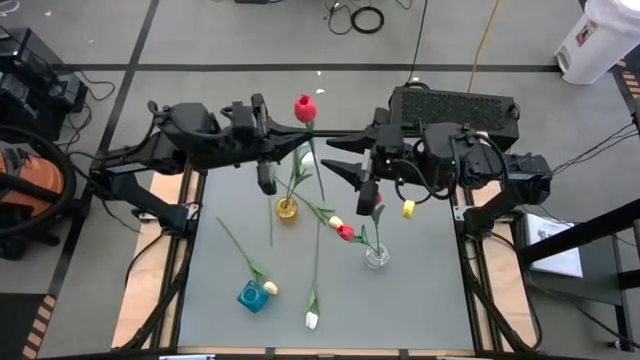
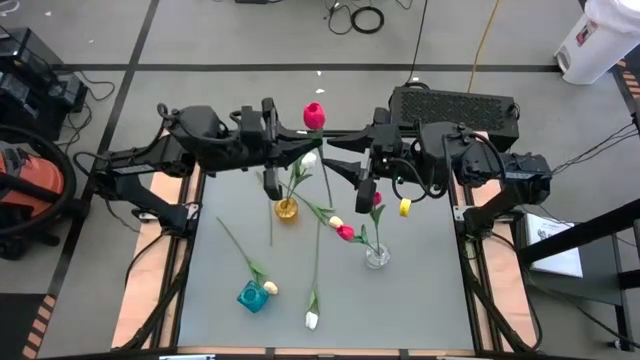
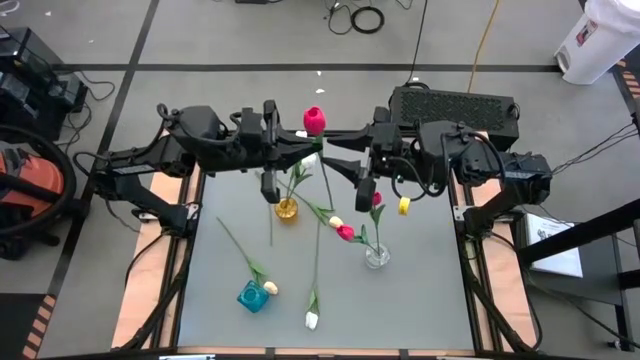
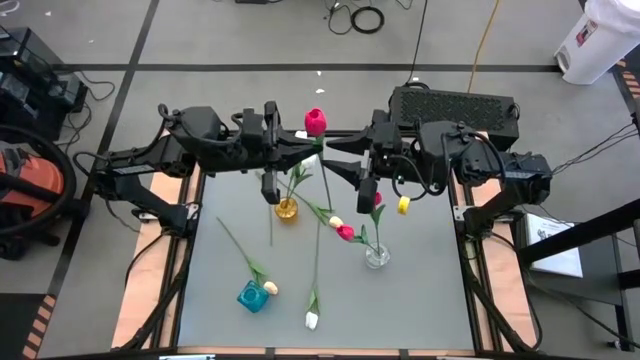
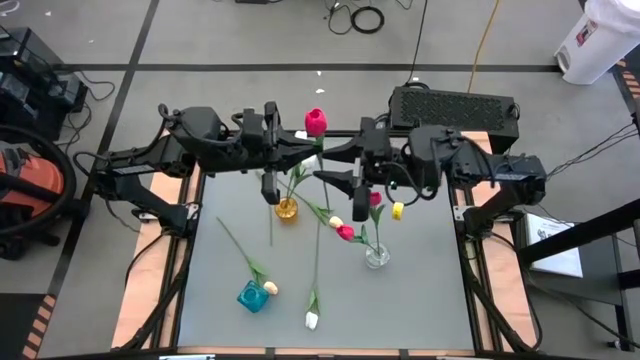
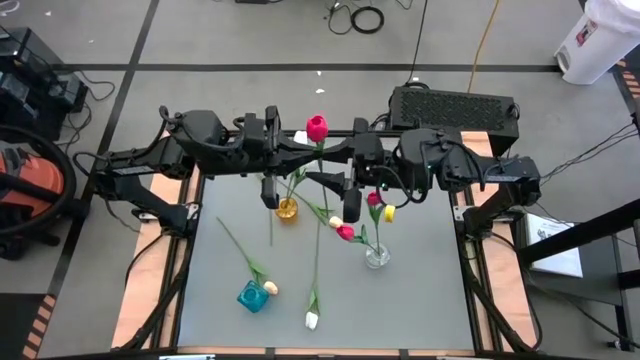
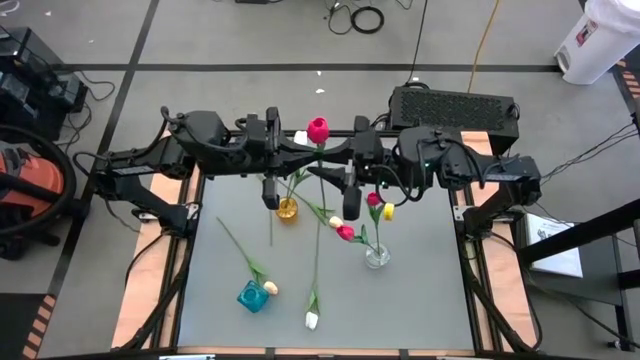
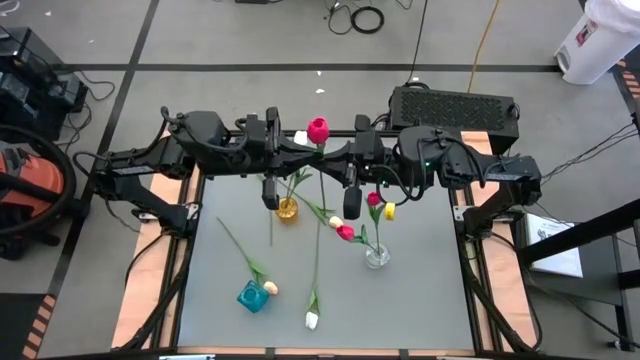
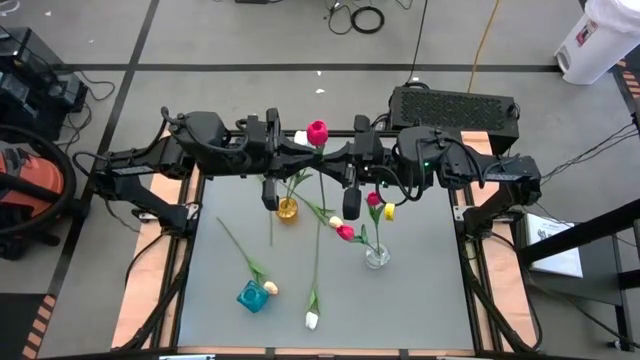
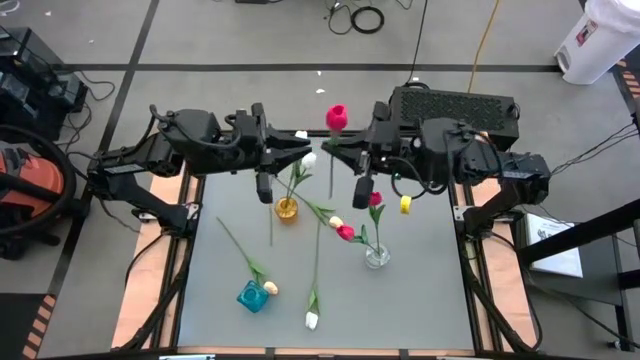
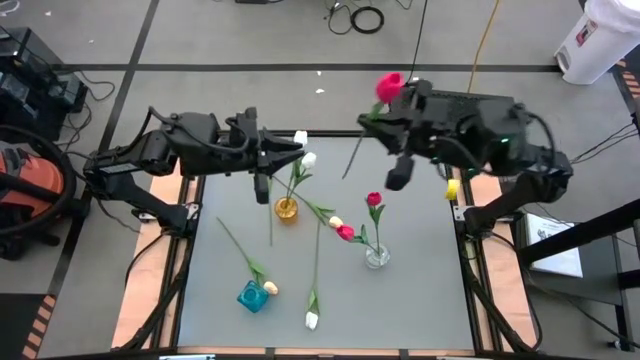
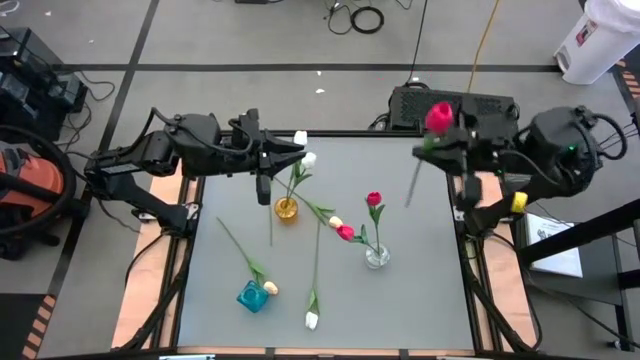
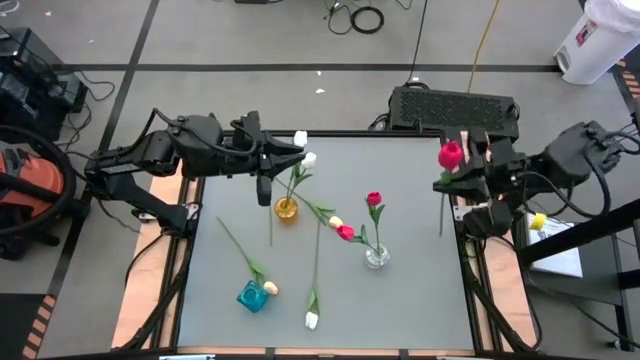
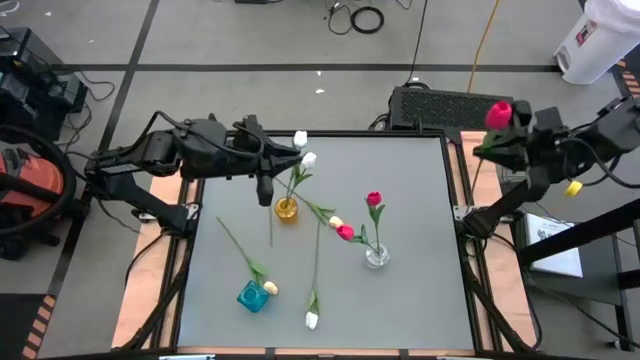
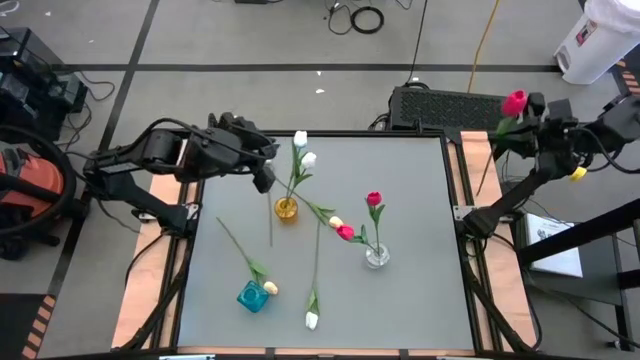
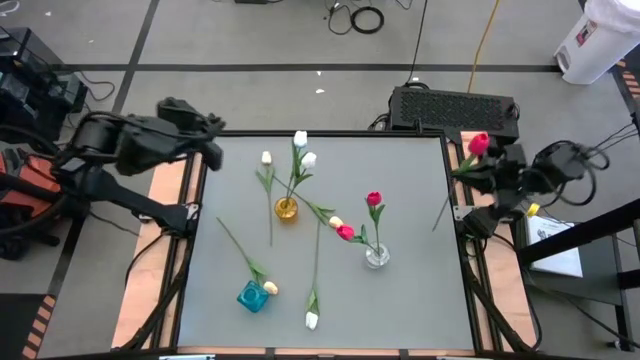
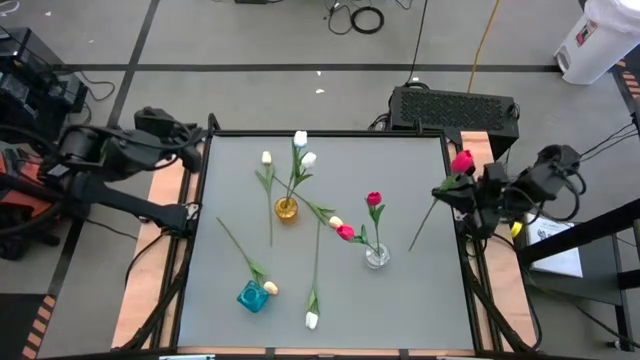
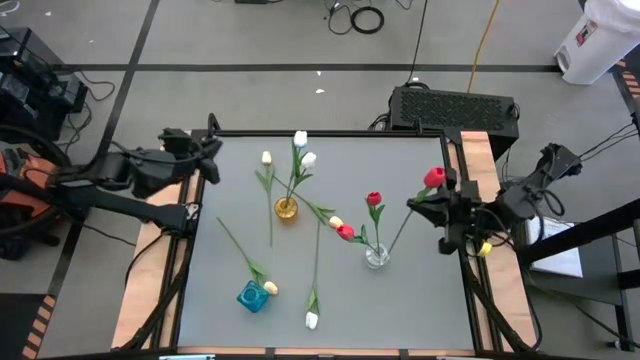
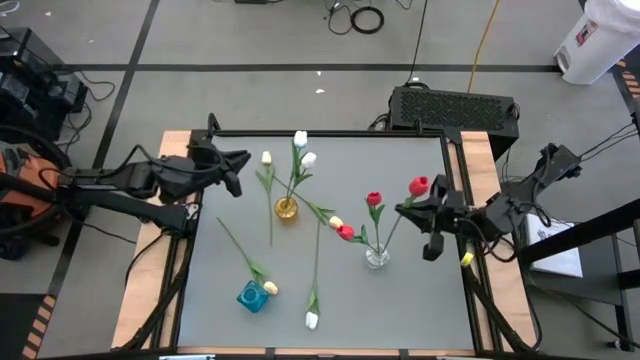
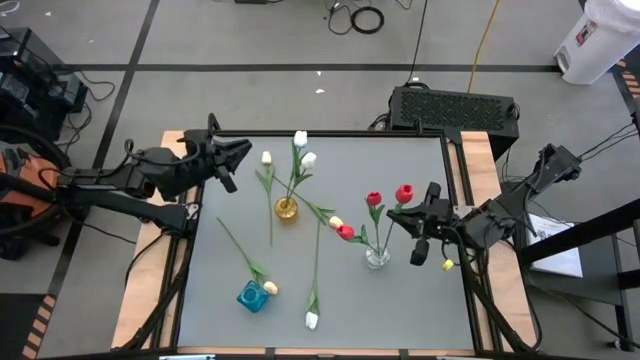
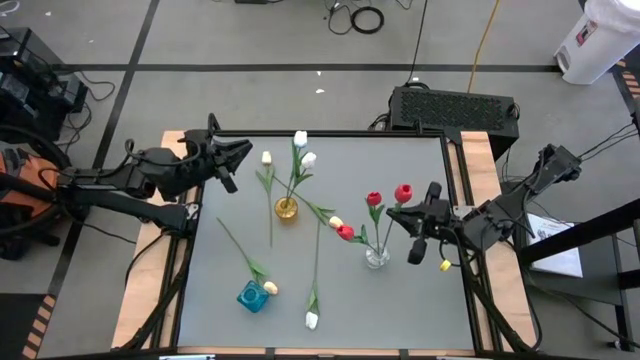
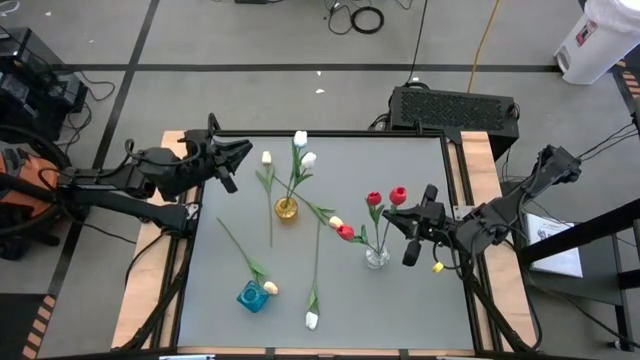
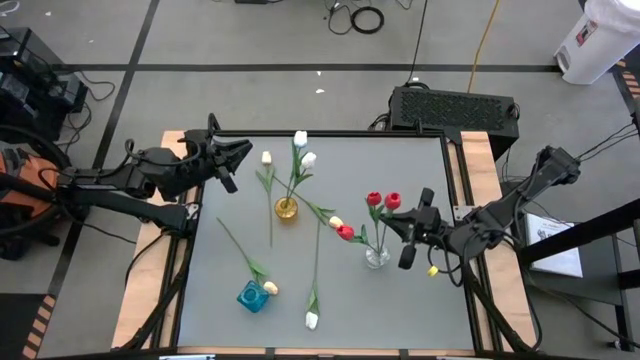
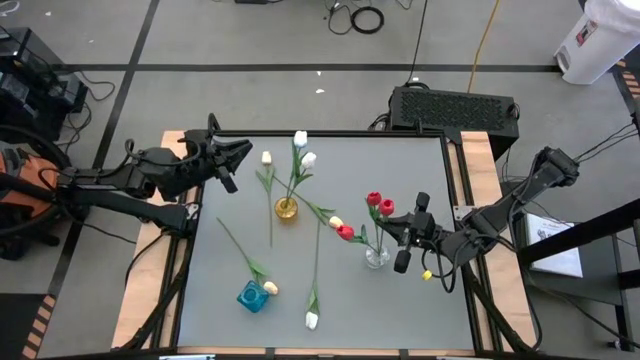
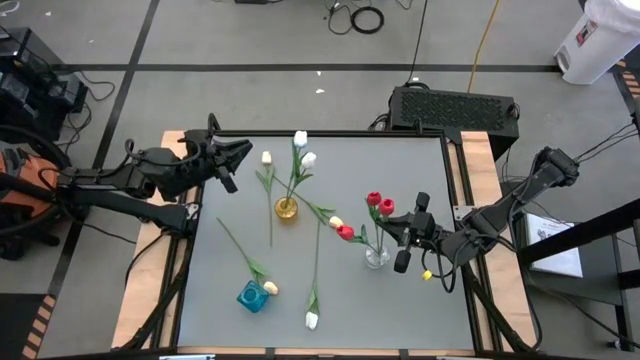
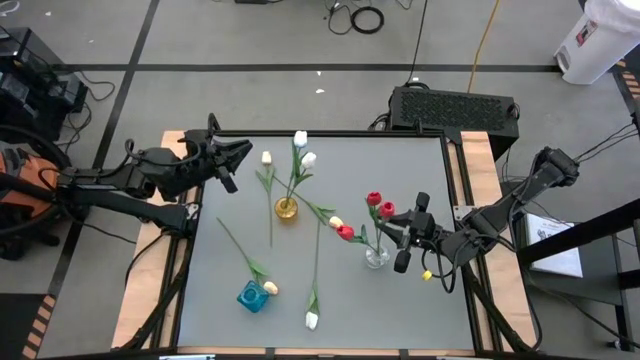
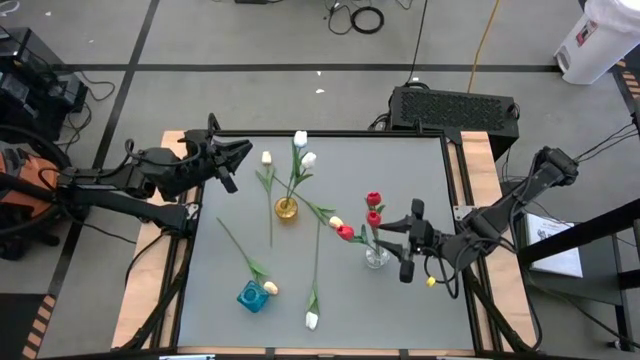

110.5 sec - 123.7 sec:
Task: Sort flowers into vase by color
Put the red tulip into the transparent vase

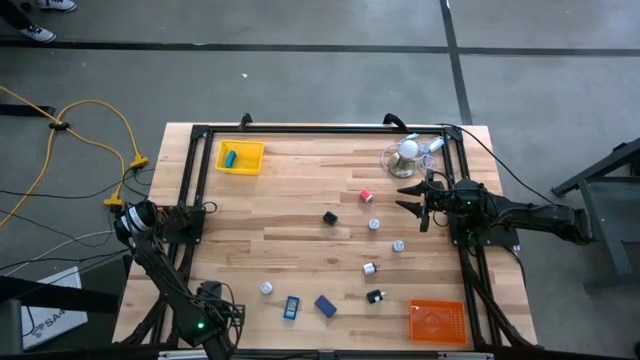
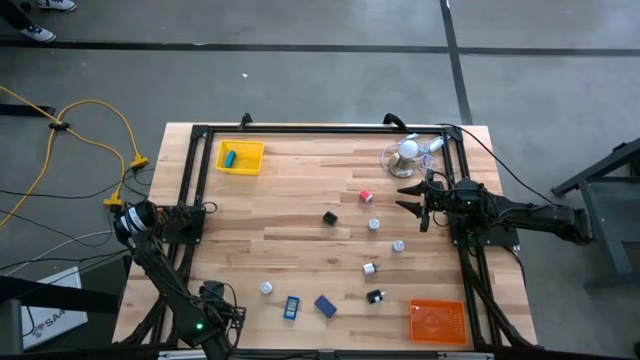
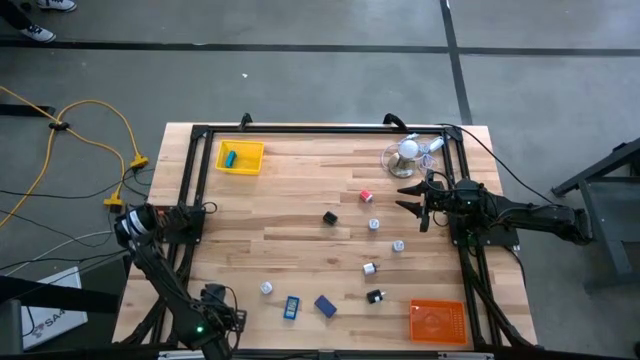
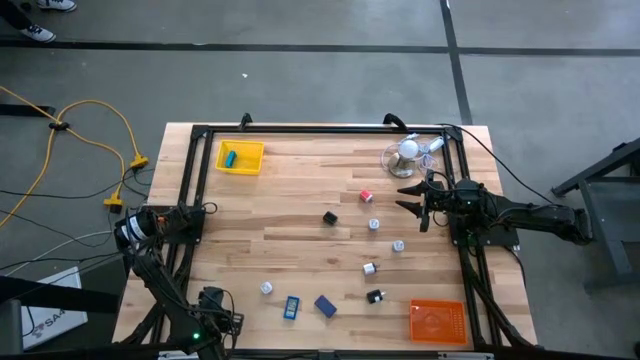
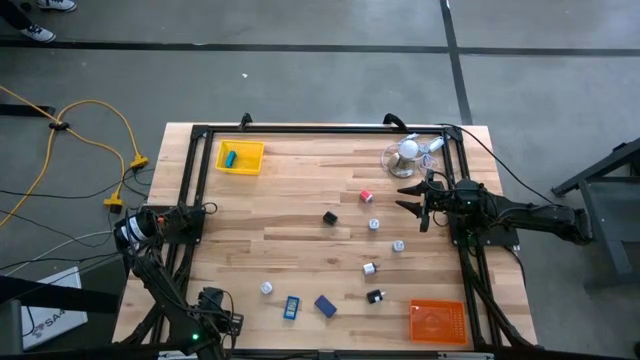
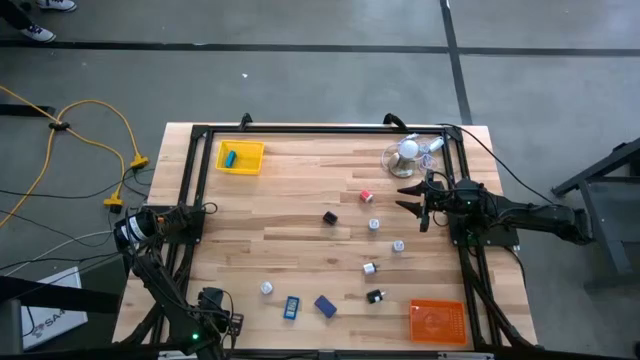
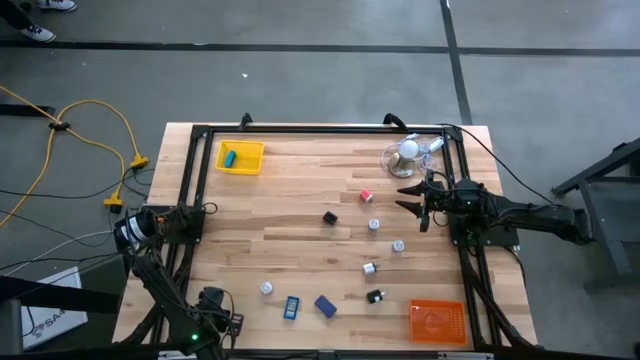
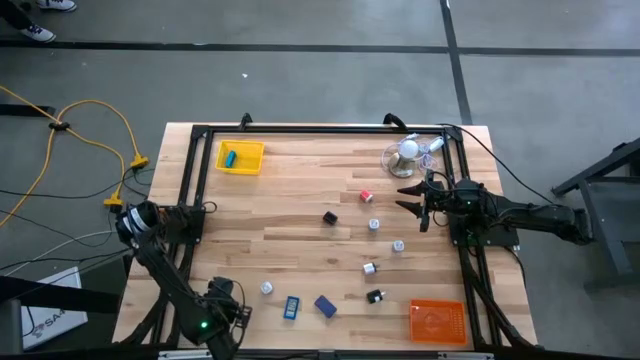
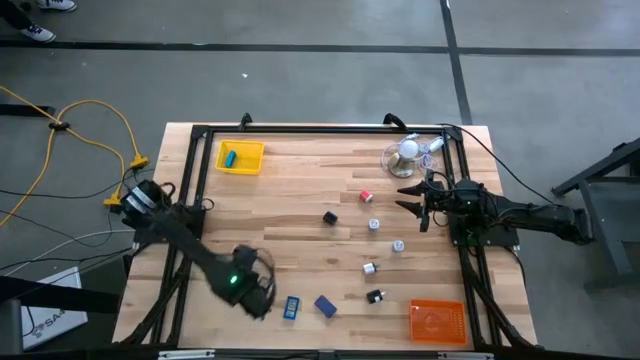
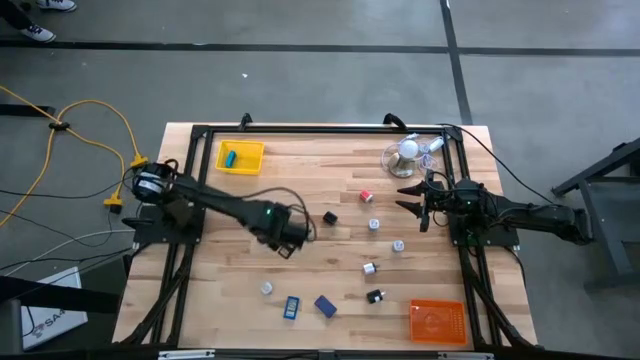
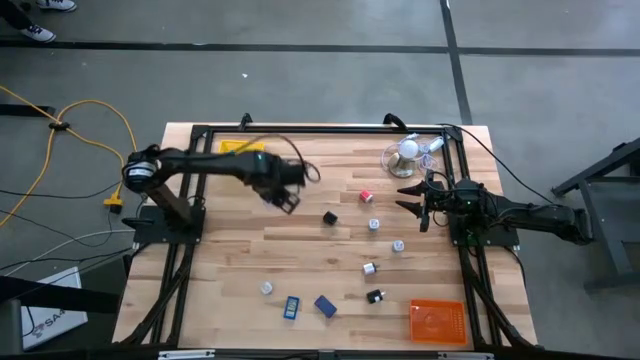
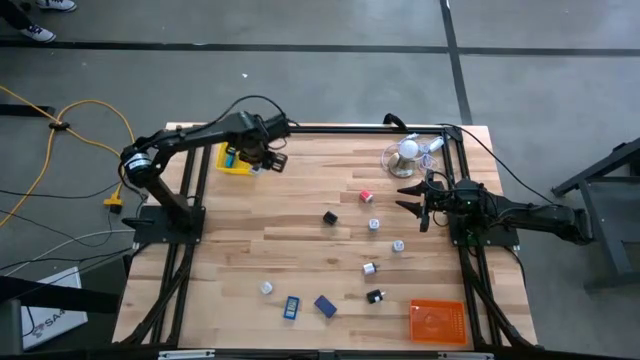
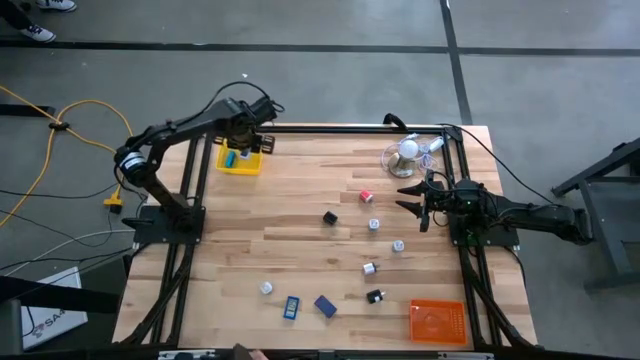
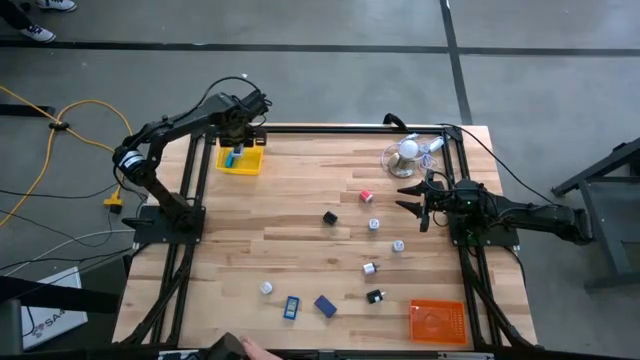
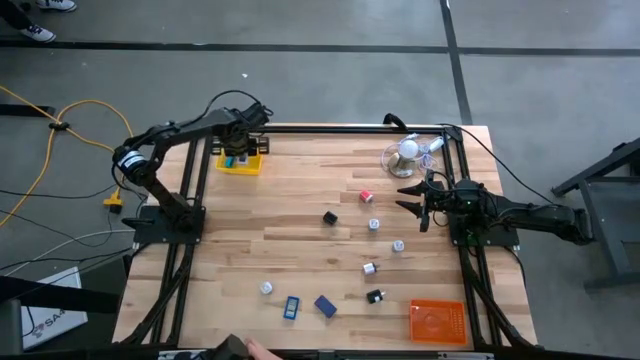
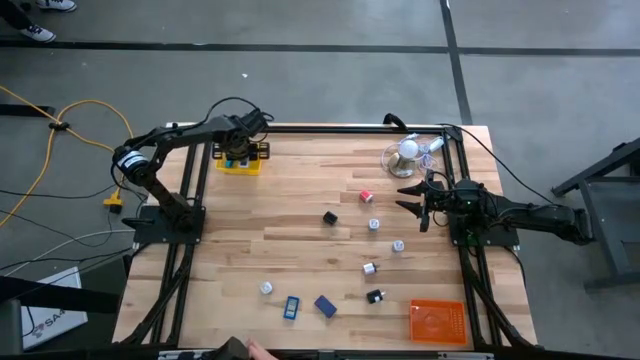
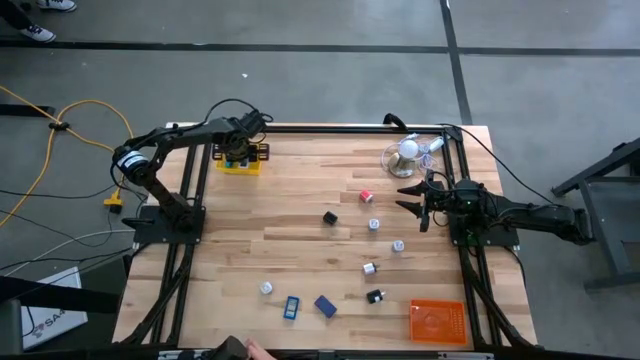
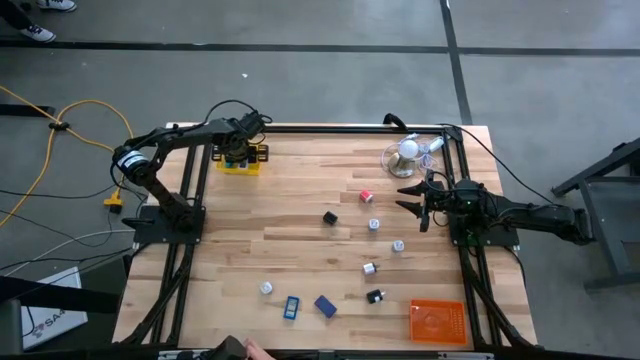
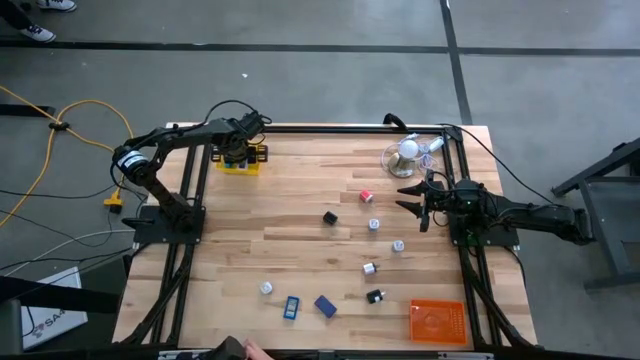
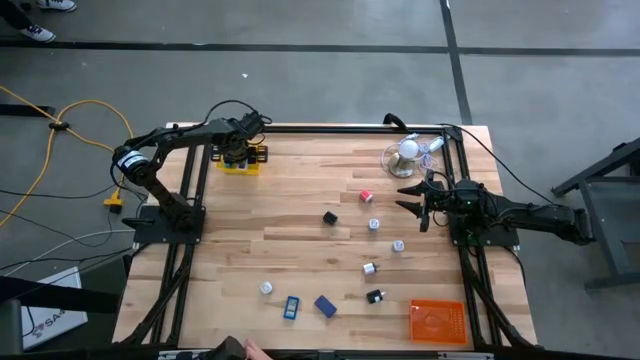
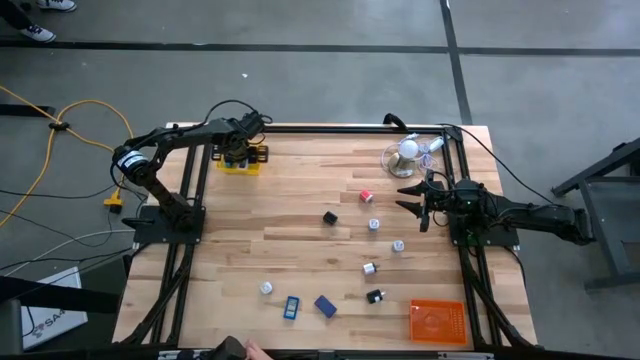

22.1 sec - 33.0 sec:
Task: Pick & Place Office items
Put the white digital timer into the yellow bin
